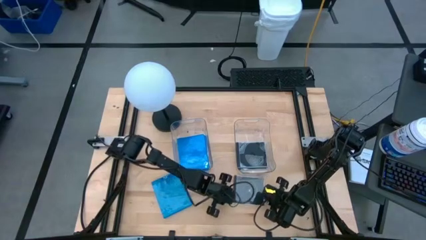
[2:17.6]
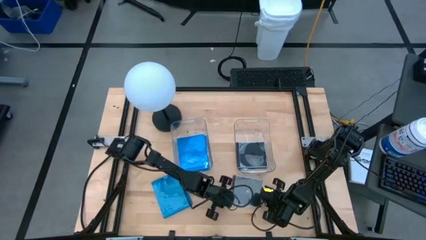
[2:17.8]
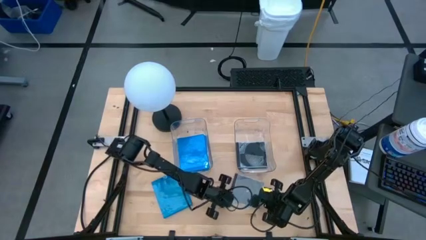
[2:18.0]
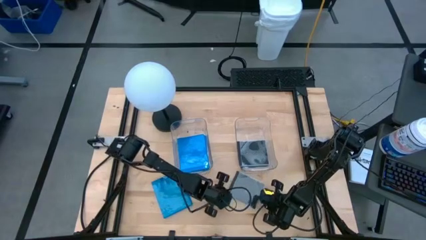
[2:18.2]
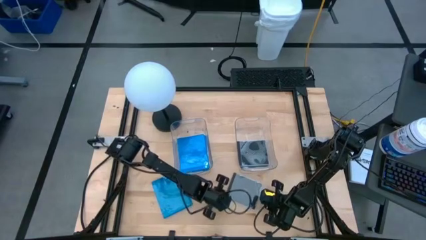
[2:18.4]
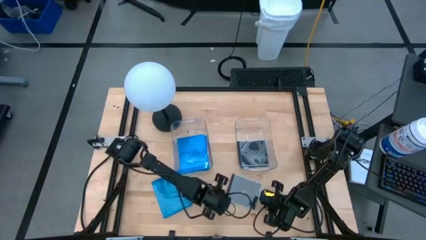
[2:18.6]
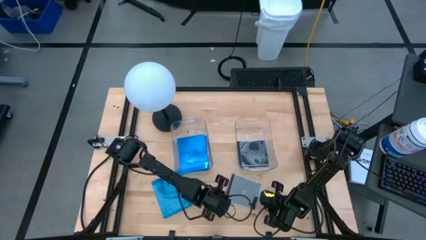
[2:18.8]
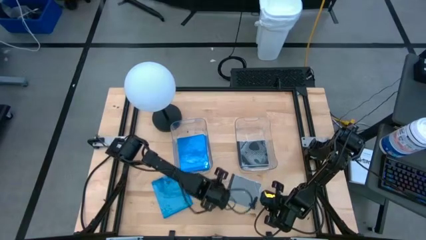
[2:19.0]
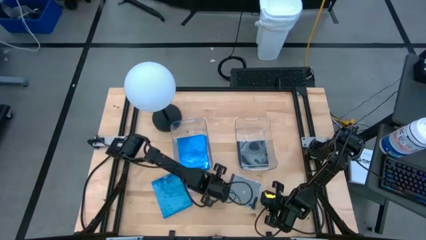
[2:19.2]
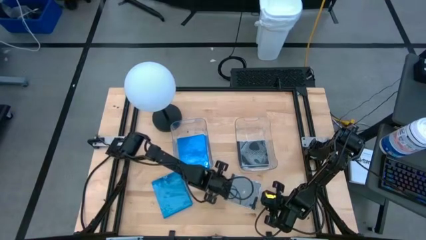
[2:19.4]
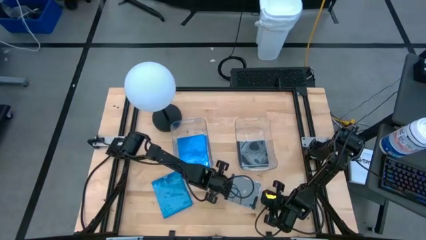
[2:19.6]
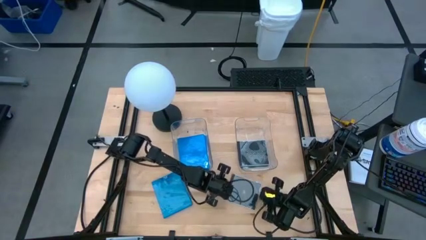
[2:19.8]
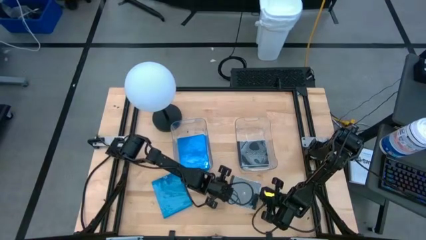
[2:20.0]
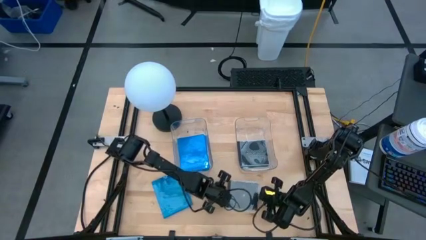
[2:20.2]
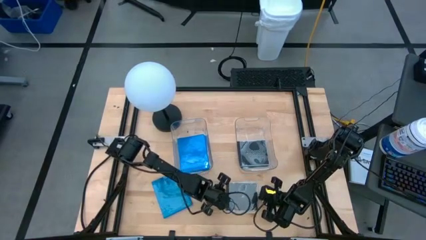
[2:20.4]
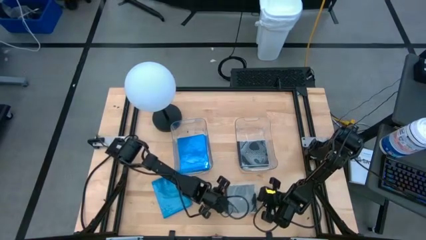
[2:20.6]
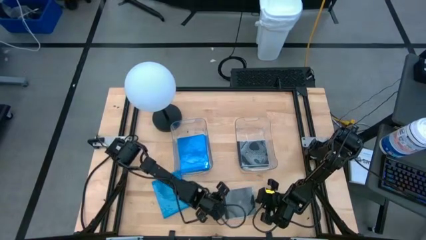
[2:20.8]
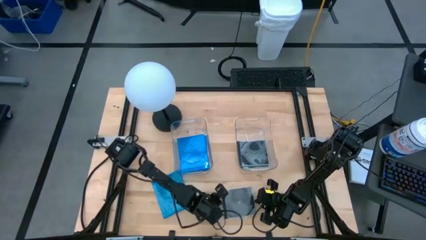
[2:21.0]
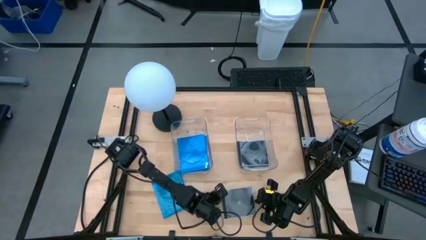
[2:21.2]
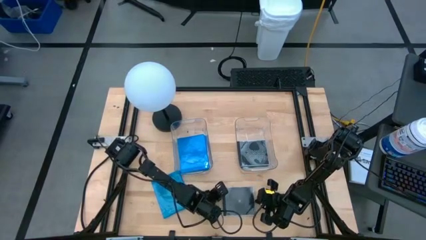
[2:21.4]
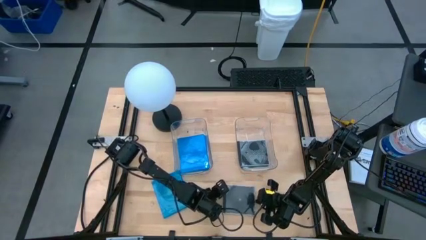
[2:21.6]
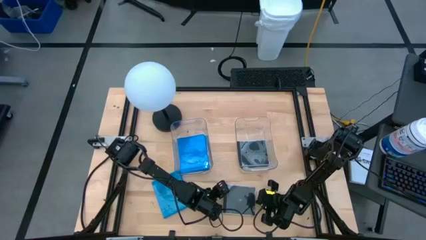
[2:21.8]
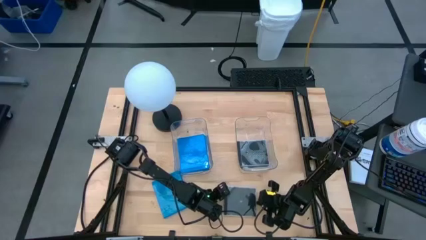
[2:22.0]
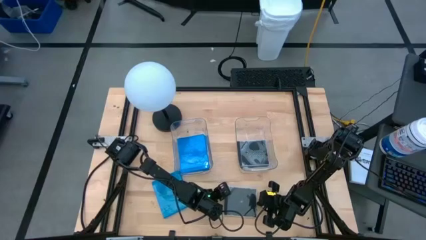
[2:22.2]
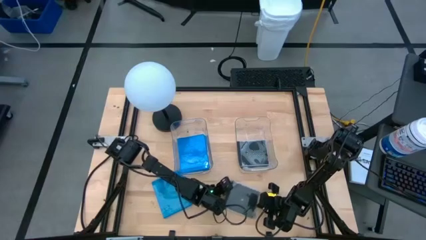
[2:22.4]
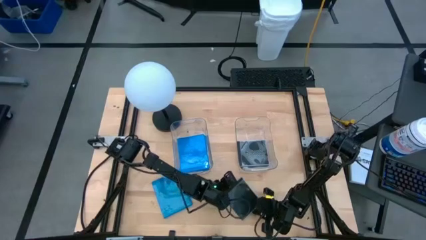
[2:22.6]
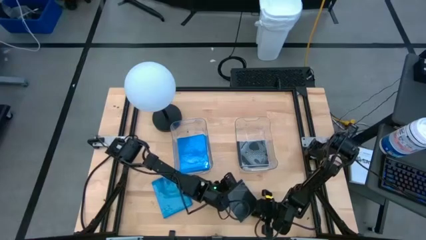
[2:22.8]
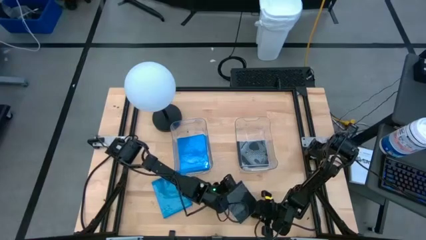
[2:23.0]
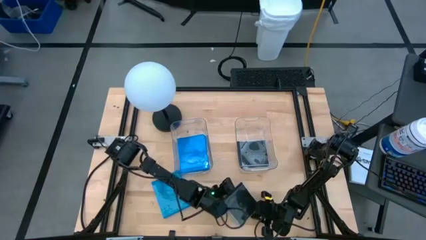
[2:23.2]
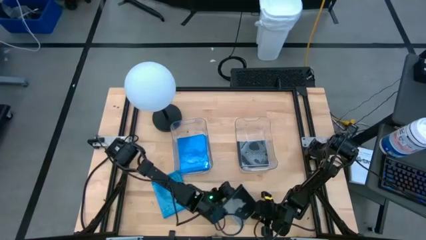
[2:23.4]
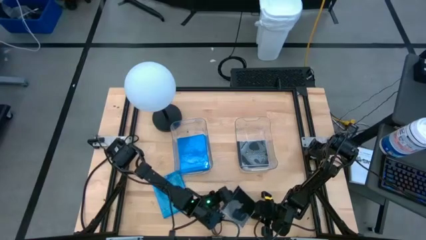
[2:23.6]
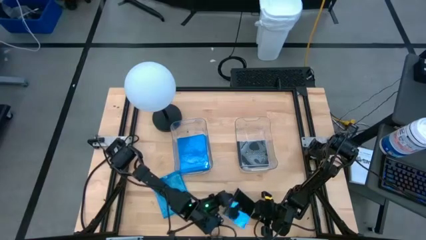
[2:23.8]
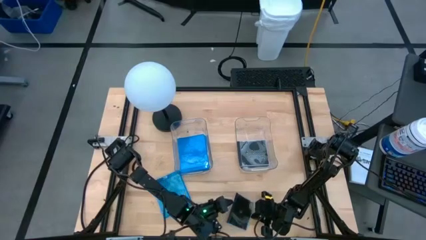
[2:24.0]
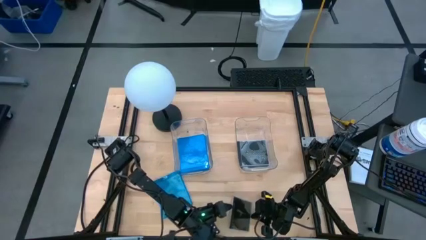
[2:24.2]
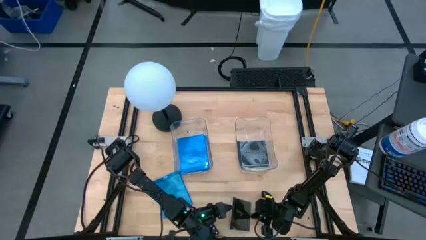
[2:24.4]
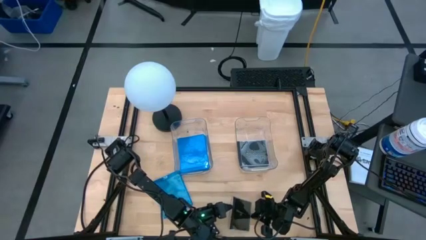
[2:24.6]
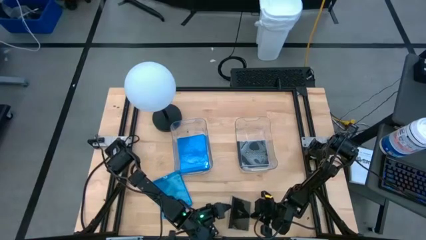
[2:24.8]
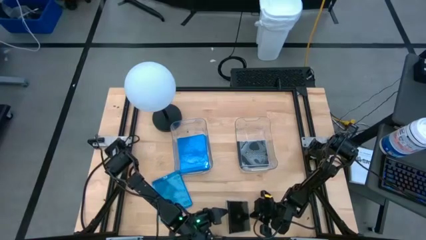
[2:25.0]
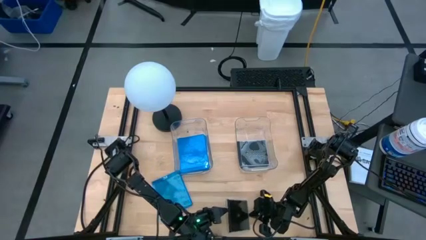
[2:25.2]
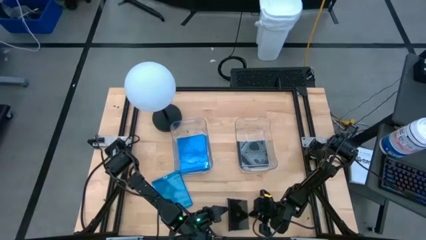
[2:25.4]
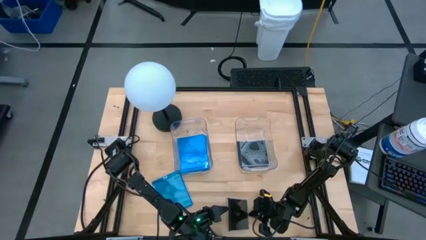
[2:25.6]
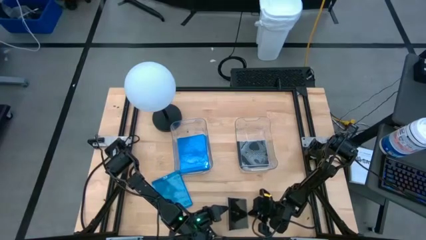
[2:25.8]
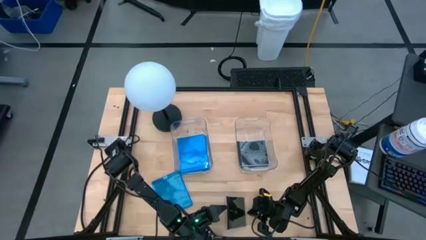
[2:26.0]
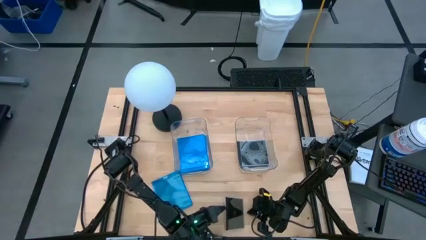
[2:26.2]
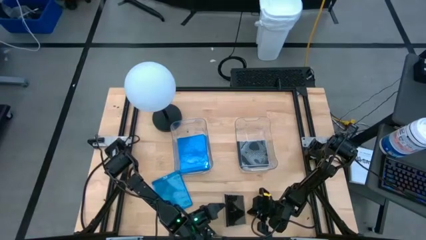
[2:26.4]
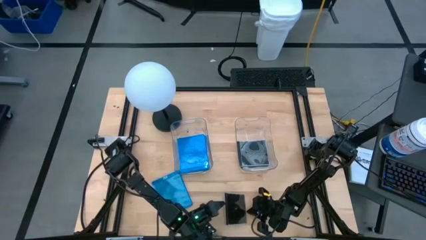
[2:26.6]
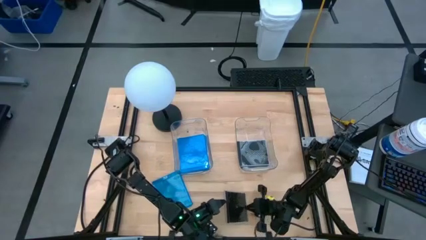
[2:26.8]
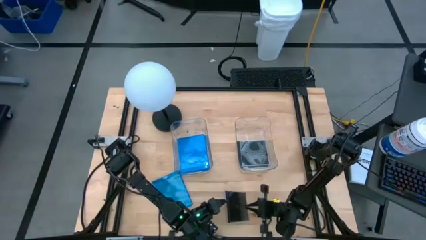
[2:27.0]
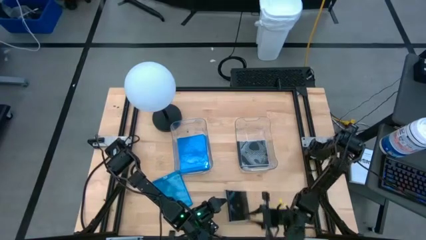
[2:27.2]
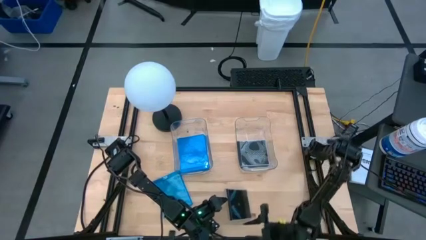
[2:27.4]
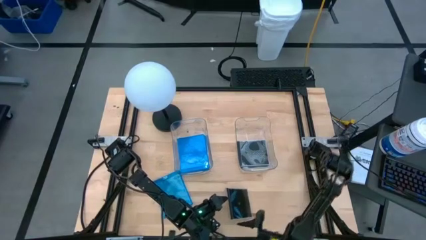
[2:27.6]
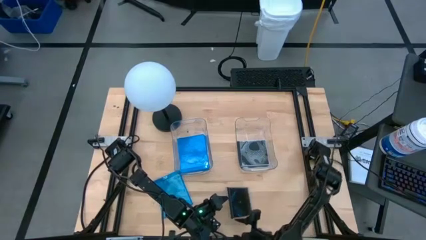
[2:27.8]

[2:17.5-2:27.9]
Task: Pick & place jewel cases by type
Put the black CD case into the right transparent bin

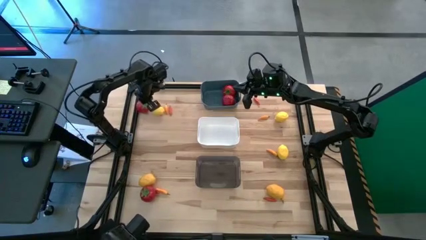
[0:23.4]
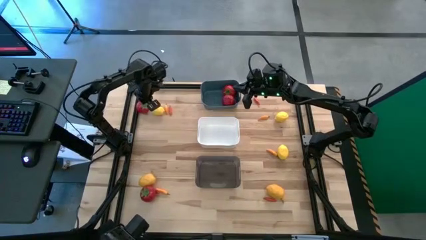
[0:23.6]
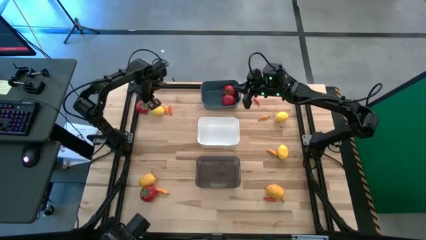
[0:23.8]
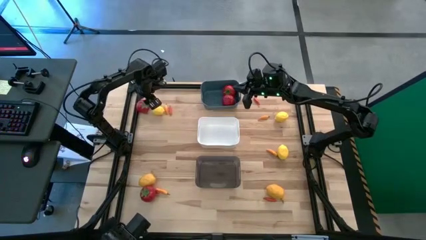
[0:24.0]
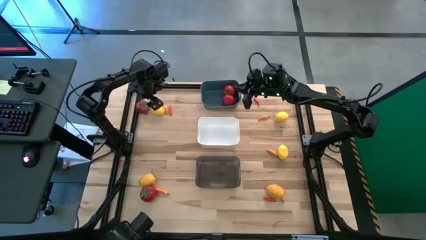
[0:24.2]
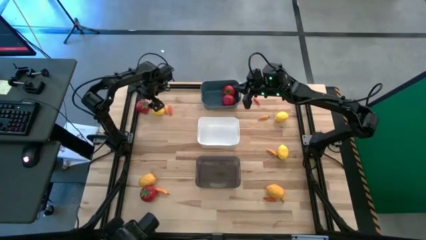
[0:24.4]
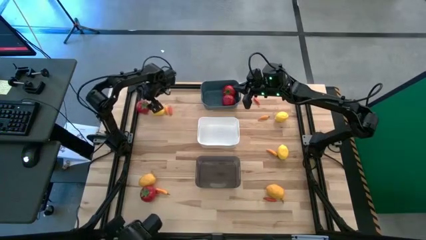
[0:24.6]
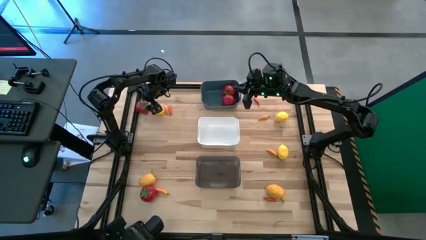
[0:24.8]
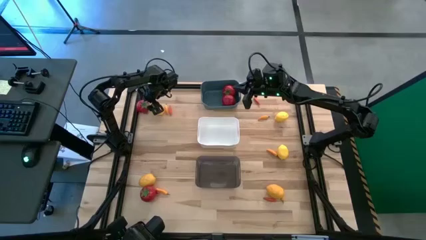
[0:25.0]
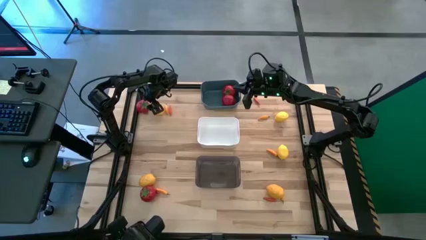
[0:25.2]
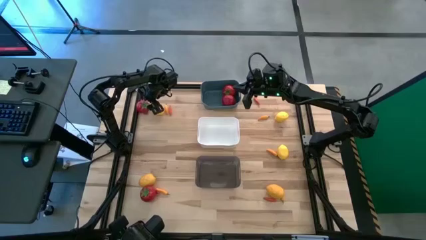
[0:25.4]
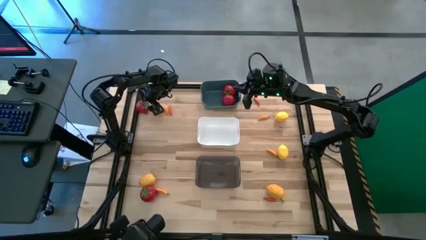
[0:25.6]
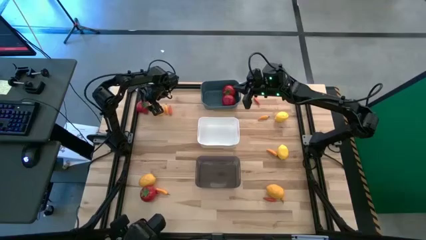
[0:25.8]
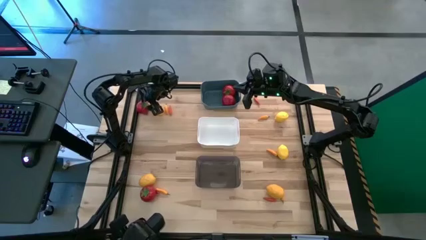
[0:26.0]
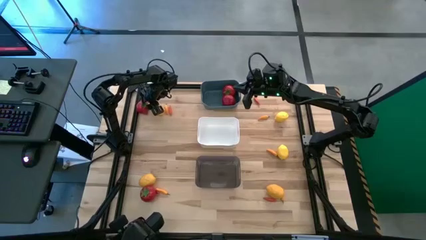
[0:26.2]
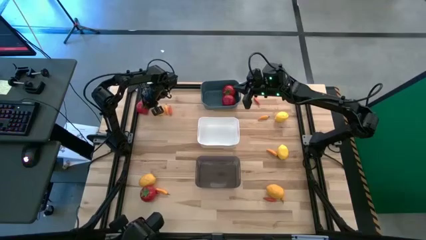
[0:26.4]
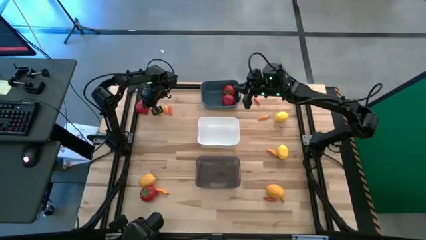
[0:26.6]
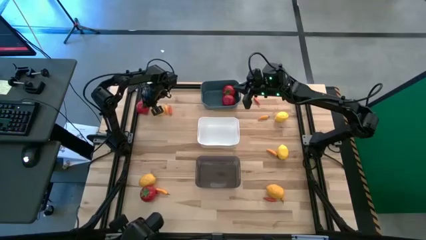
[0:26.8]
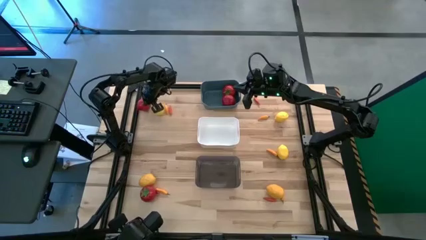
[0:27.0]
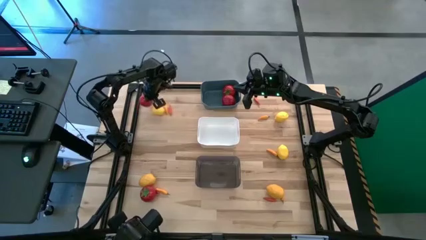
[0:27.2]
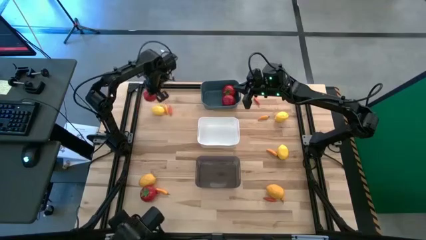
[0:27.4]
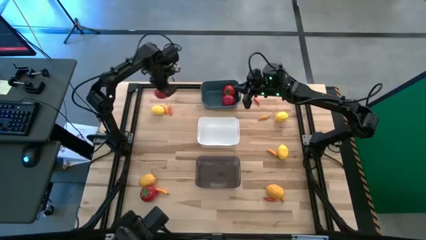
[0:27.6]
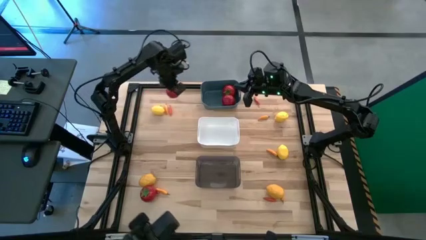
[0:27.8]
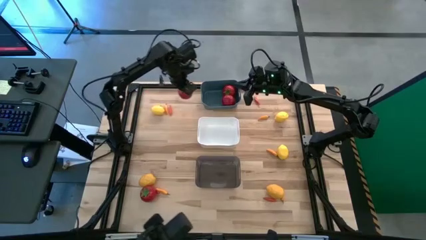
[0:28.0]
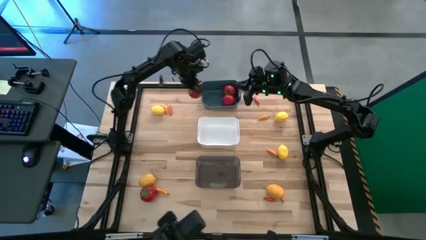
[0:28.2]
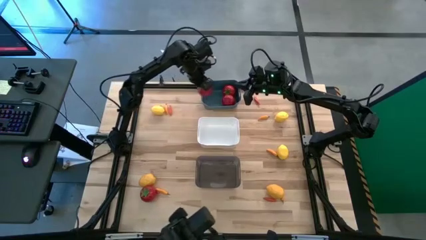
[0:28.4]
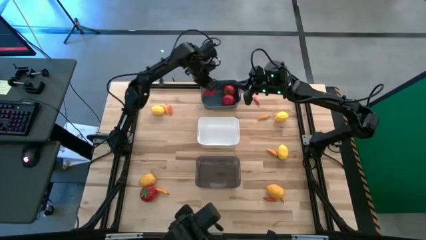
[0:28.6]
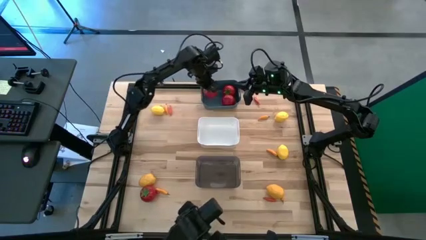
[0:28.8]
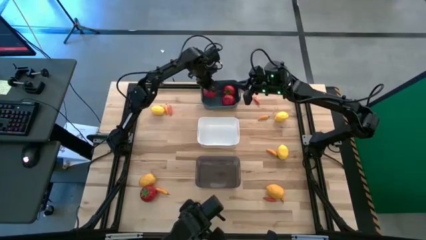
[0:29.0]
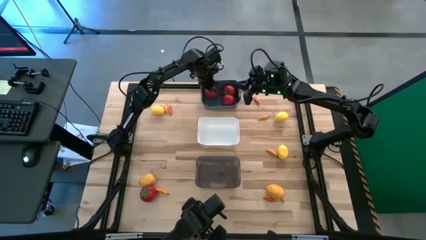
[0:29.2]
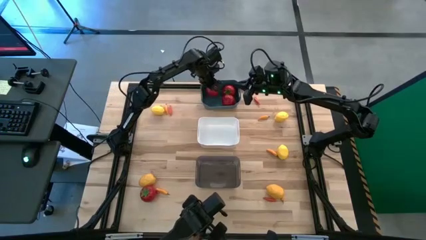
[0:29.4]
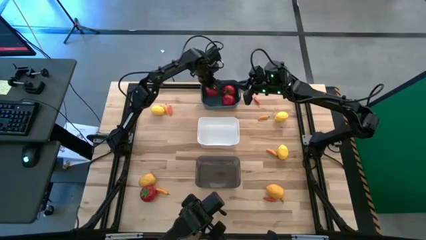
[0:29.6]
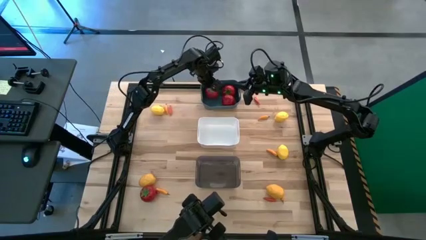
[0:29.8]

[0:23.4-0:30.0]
Task: Sort produce into baskets
Put the red tomato into the blue bin
